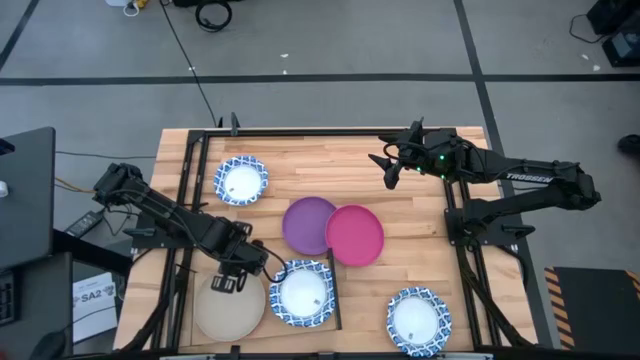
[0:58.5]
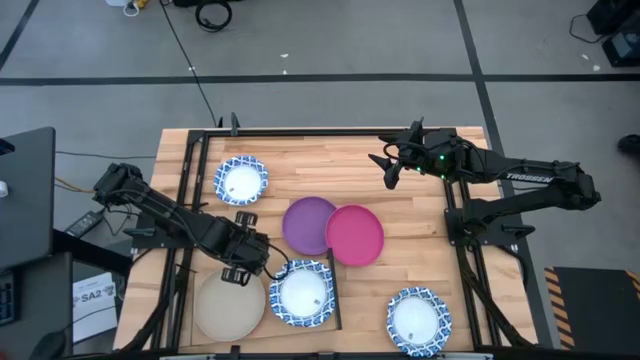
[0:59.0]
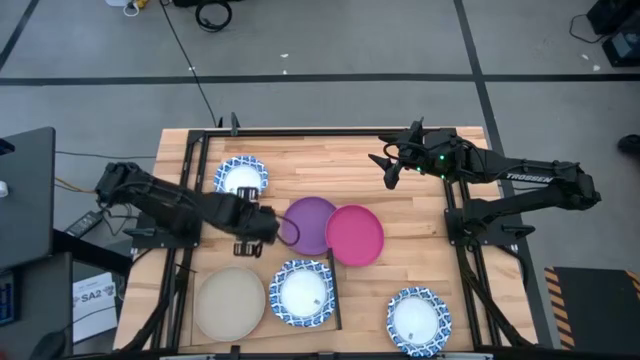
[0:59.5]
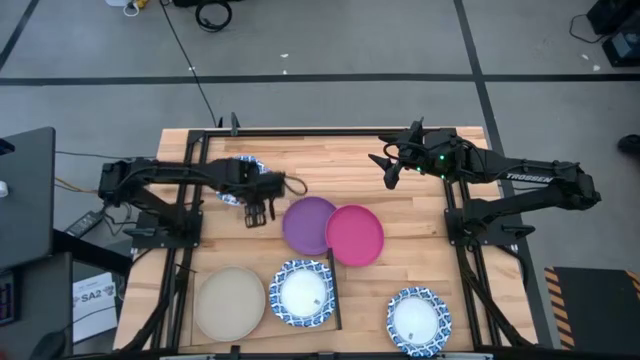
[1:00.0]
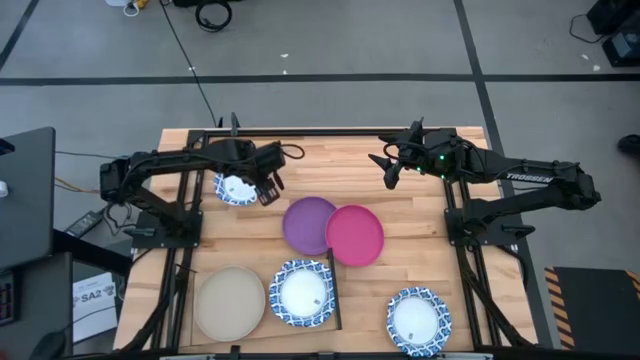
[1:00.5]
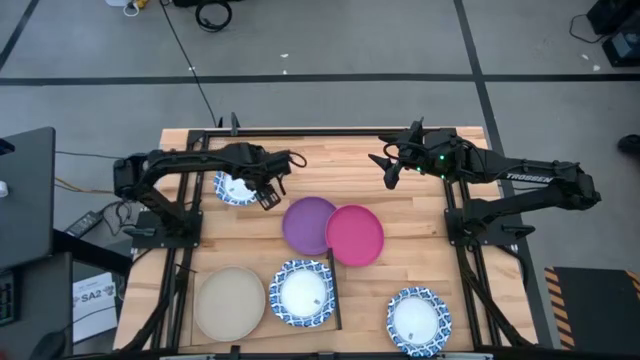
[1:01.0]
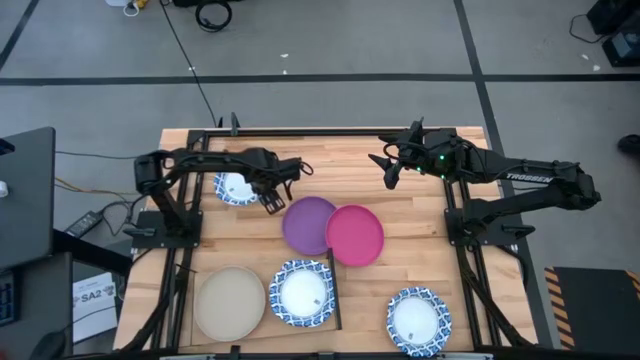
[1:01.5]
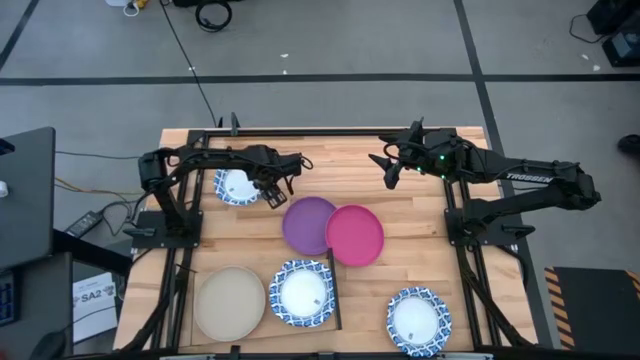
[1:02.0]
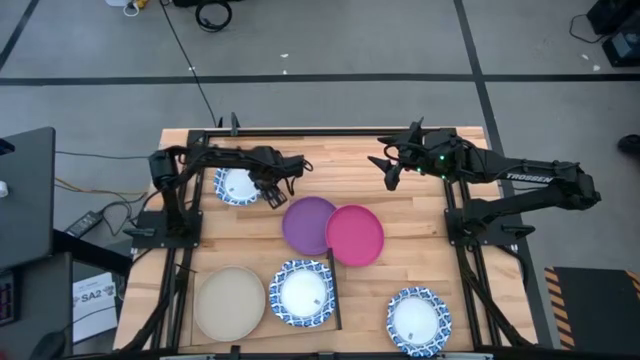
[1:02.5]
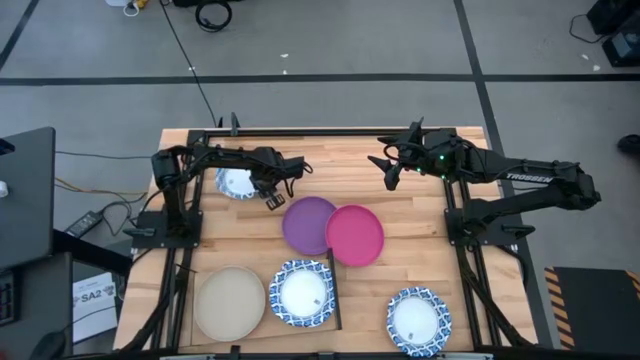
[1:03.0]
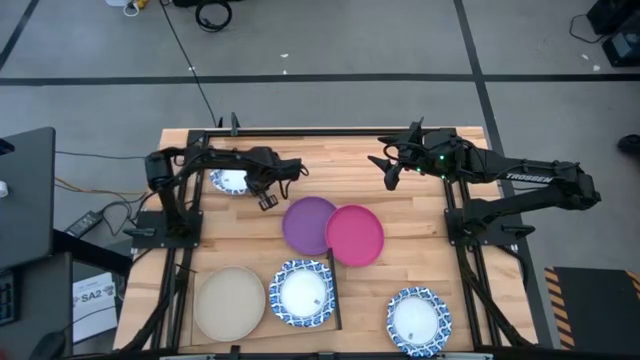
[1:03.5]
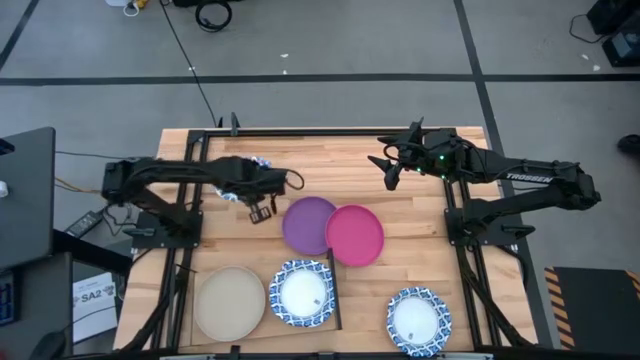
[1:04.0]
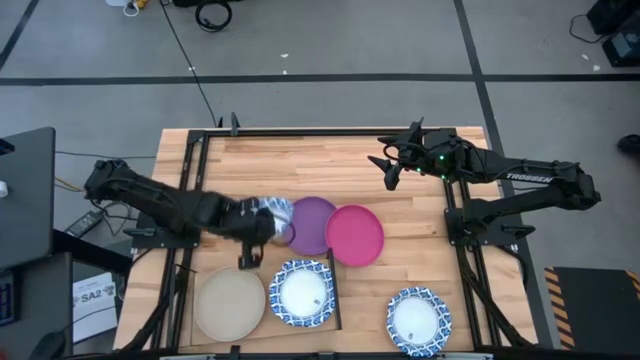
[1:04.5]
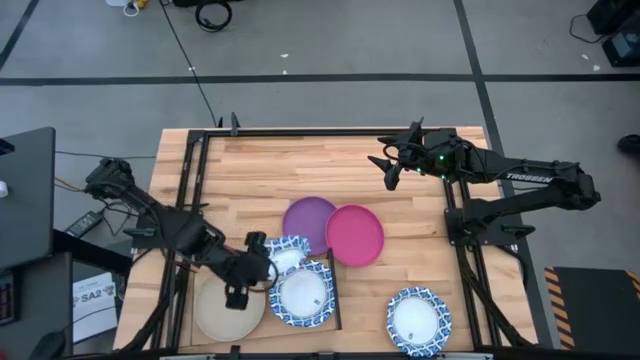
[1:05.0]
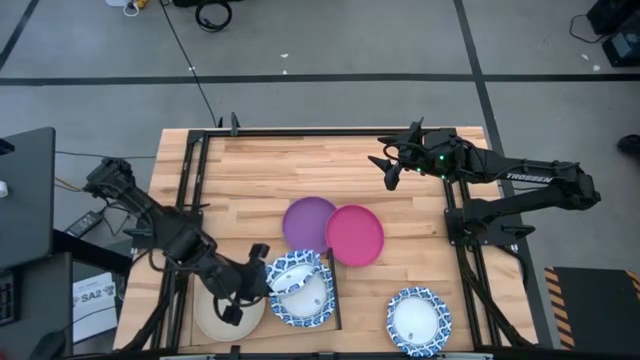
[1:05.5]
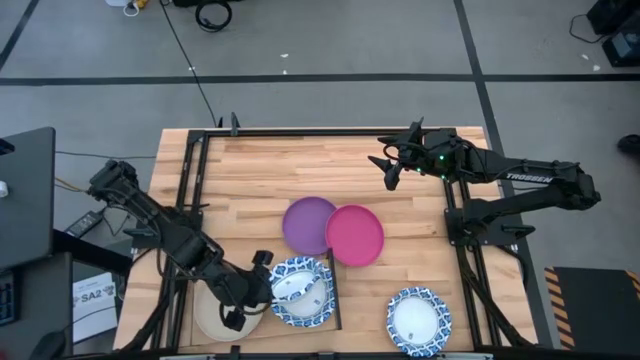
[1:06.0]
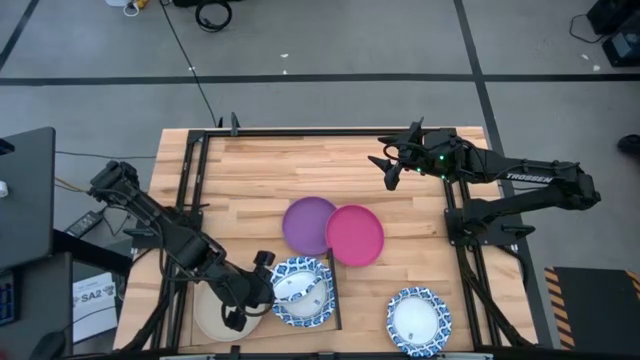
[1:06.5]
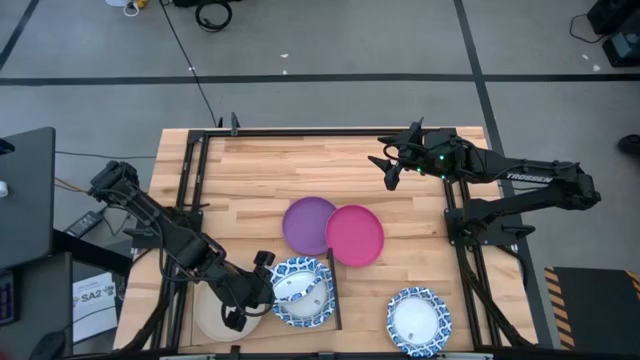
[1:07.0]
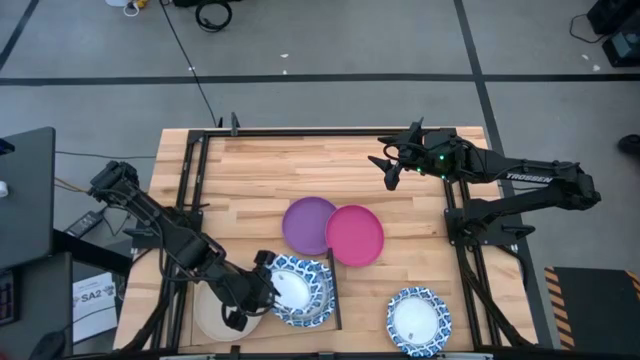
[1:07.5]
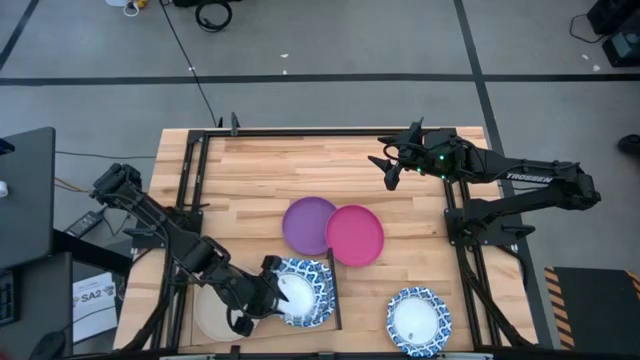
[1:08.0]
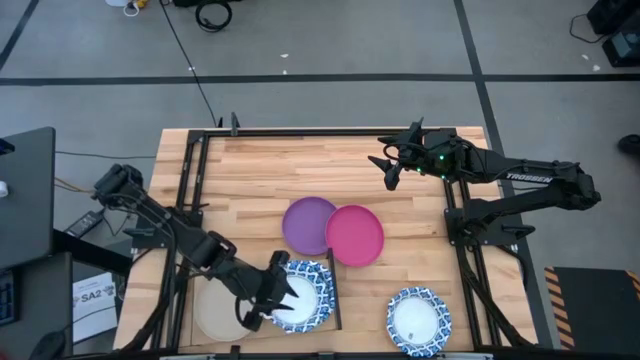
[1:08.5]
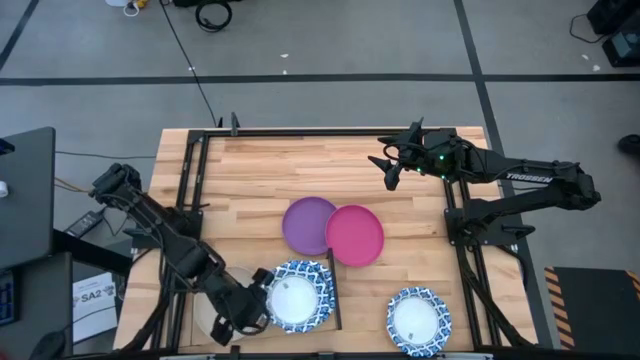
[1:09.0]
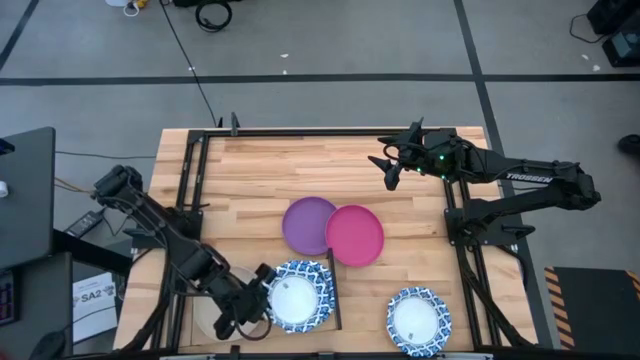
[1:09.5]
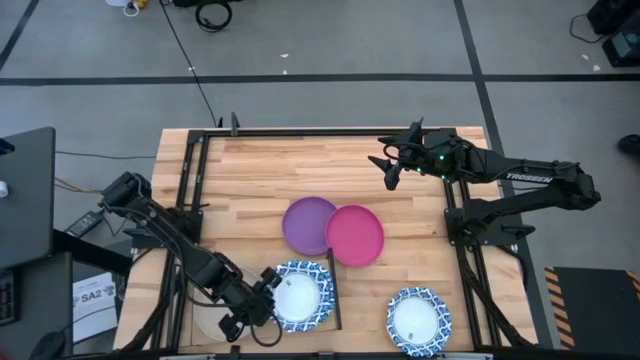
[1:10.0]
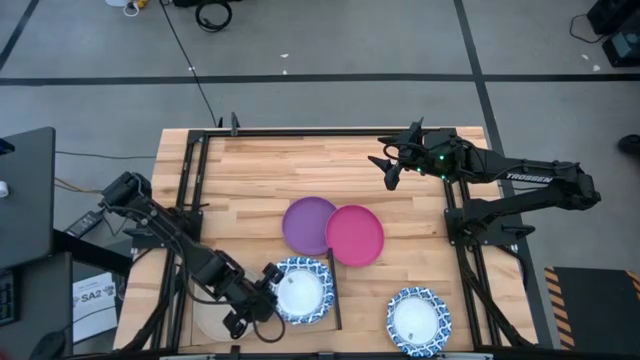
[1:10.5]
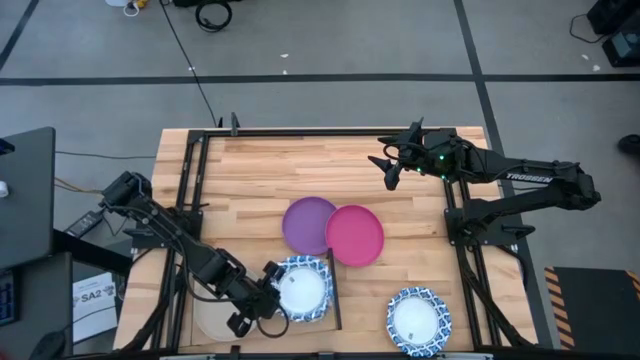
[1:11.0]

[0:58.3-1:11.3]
Task: Place and stack plates onto a shelf
Stack the top blue patterned bowl on top of the blue patterned bowl on the shelf

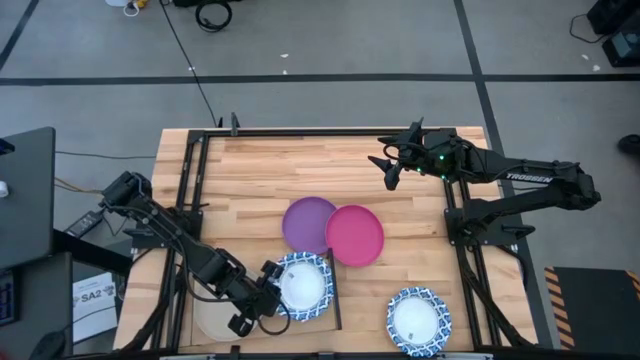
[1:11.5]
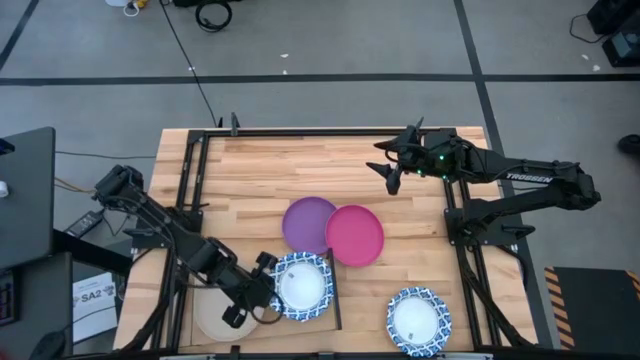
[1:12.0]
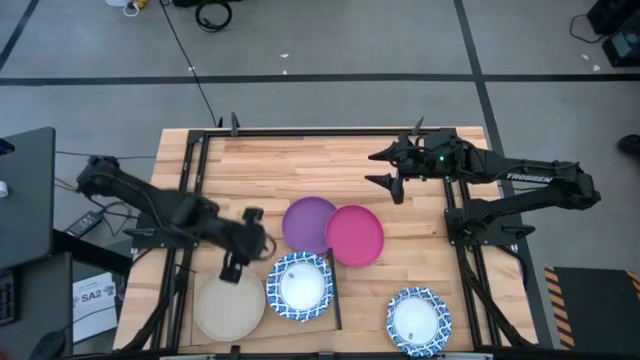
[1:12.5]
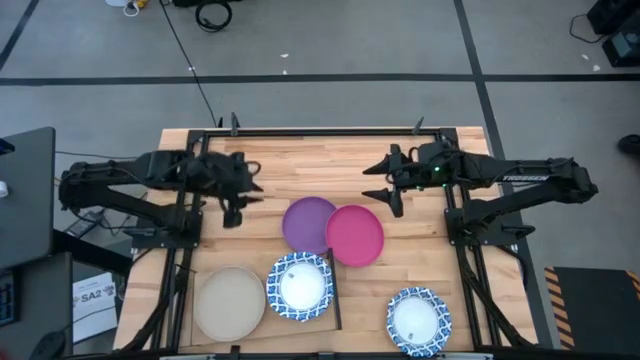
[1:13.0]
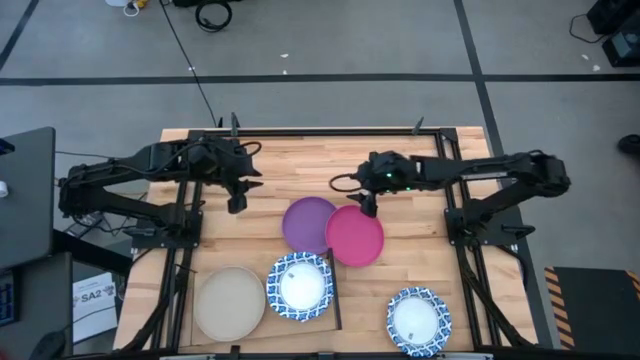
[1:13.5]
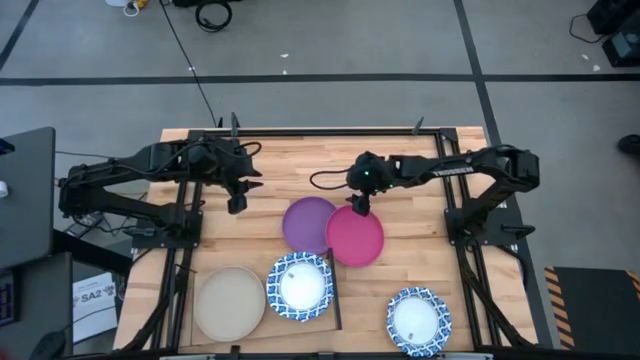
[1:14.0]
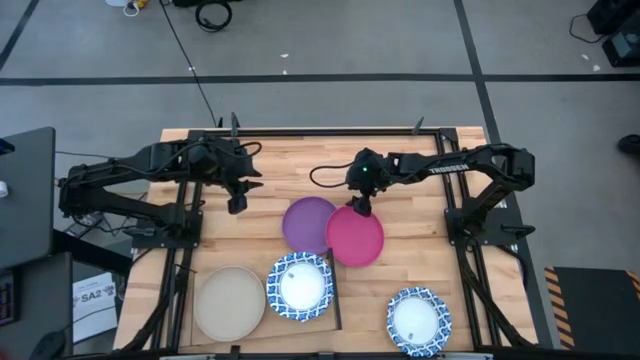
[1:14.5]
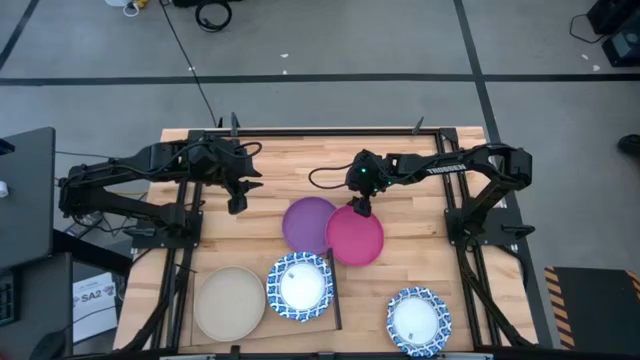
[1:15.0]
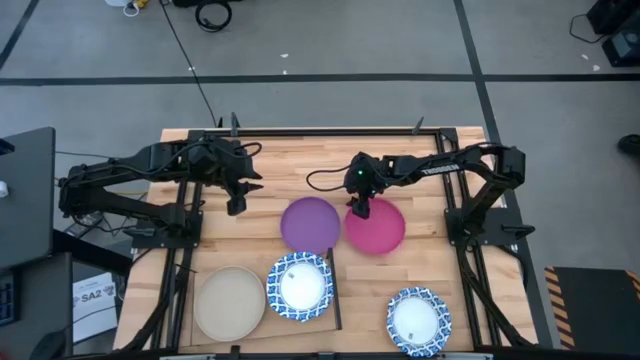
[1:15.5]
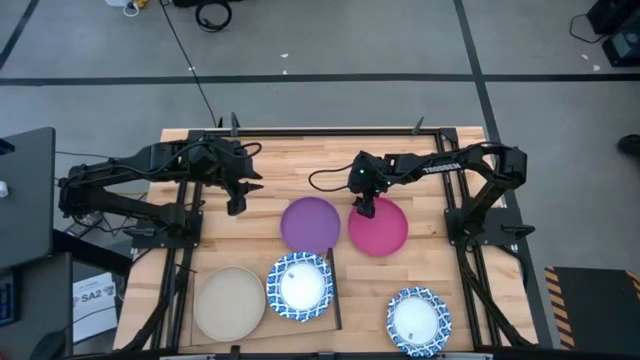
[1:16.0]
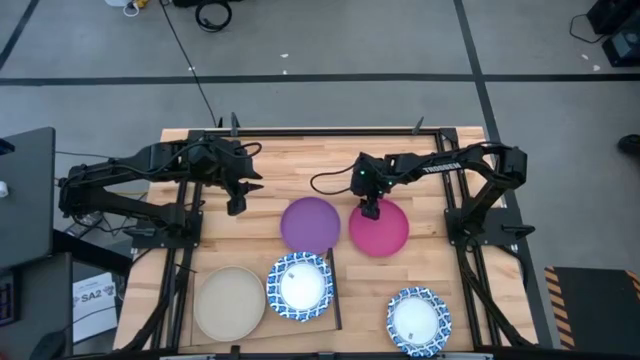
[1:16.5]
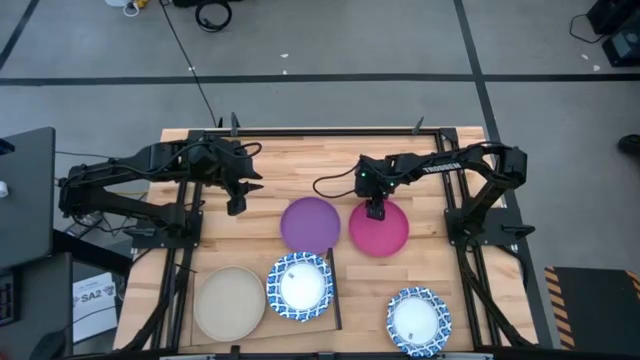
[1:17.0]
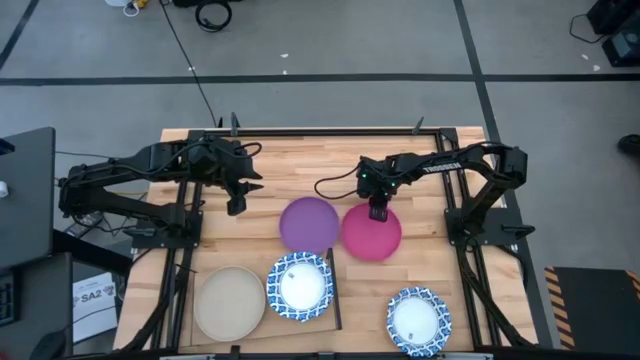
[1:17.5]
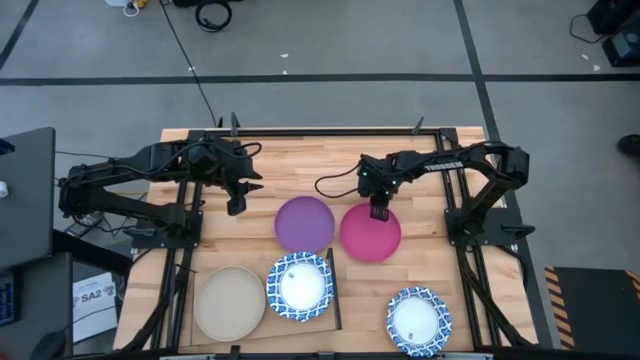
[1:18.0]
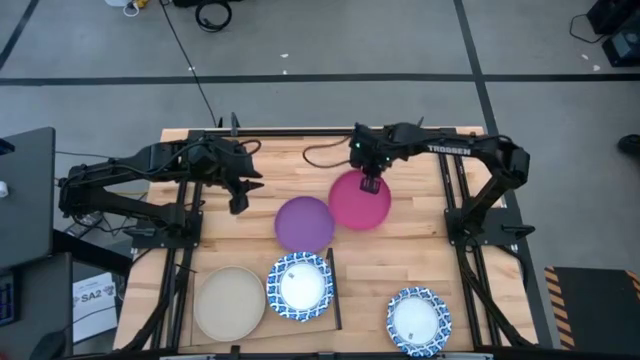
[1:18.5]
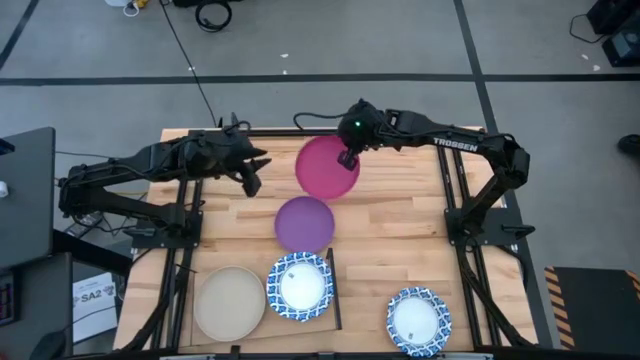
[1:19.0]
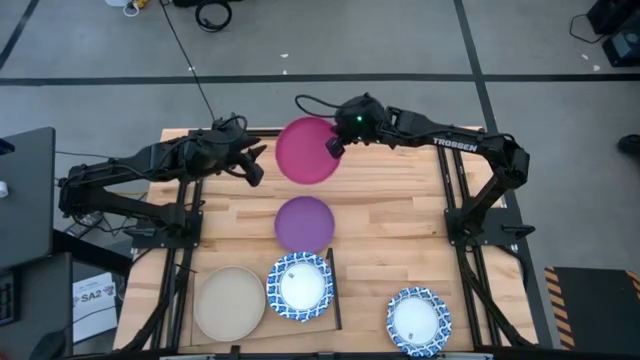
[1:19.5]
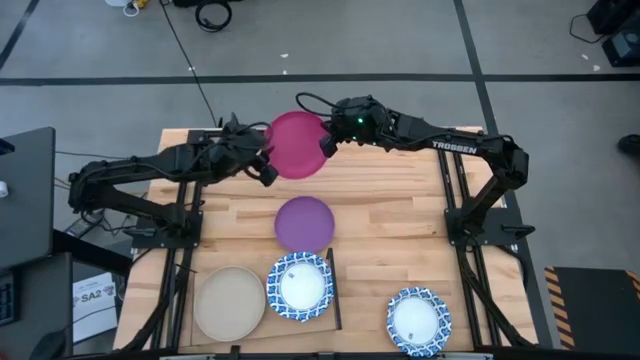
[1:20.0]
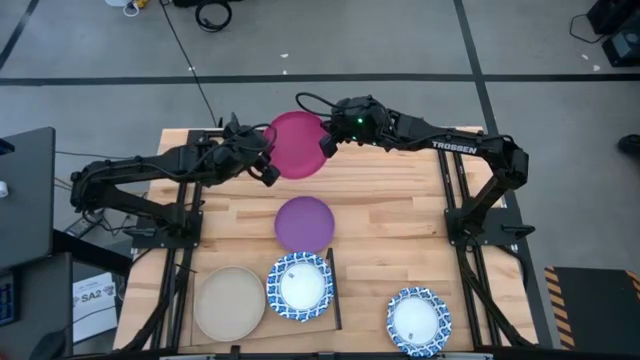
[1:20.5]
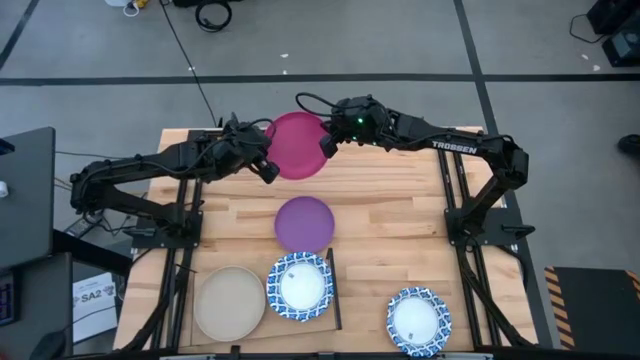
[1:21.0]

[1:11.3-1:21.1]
Stack the pink plate on top of the gray plate on the shelf
